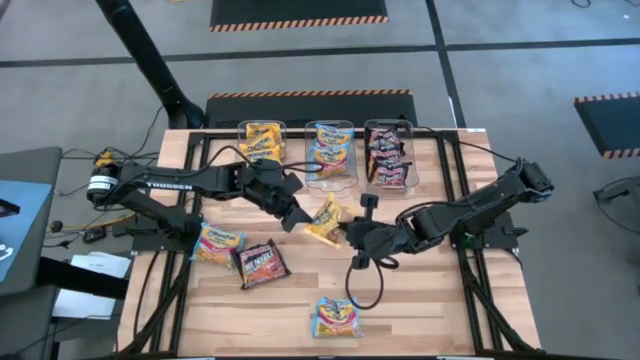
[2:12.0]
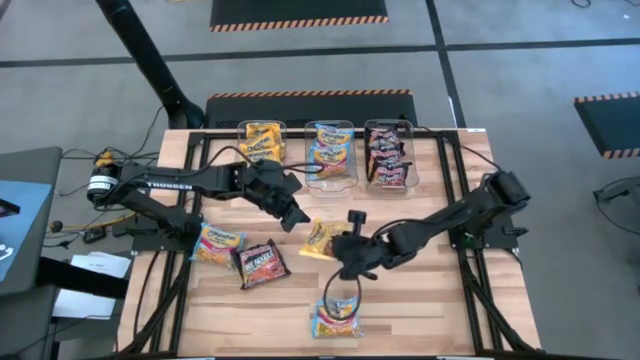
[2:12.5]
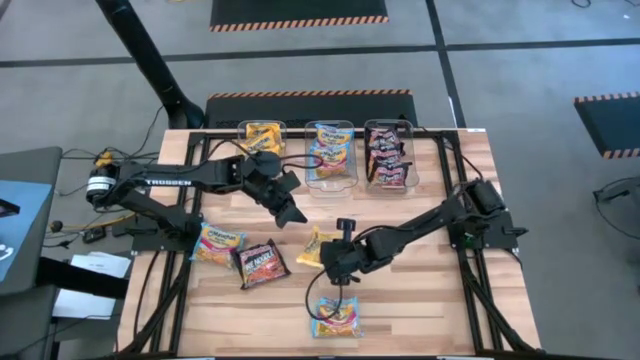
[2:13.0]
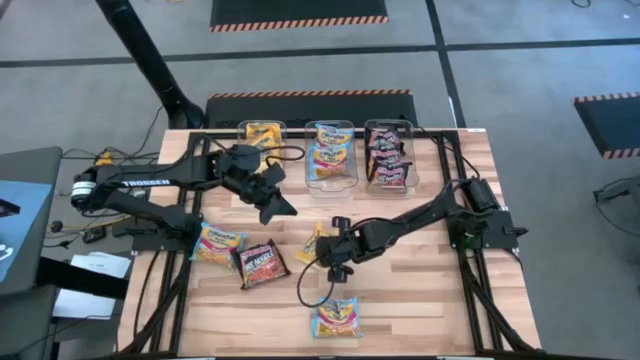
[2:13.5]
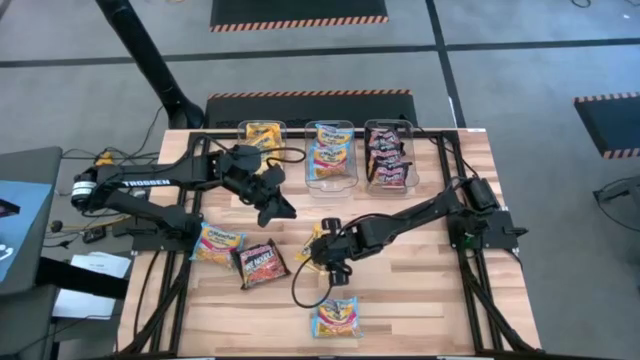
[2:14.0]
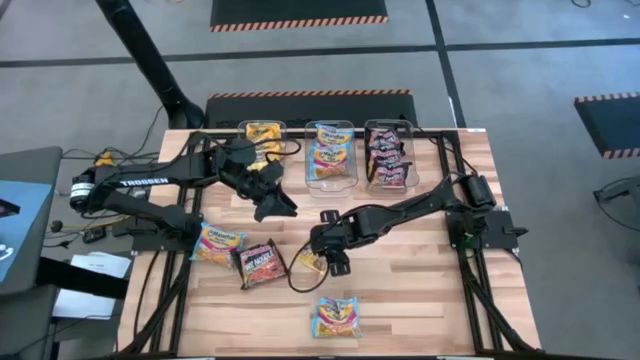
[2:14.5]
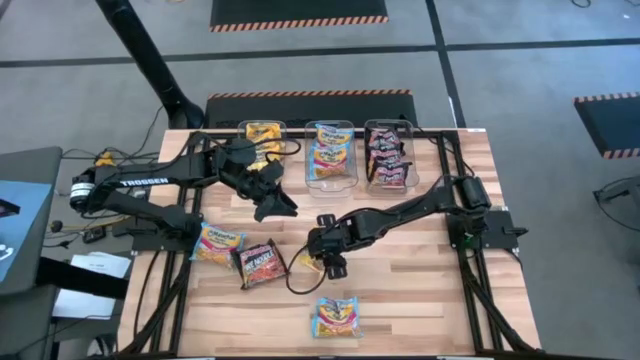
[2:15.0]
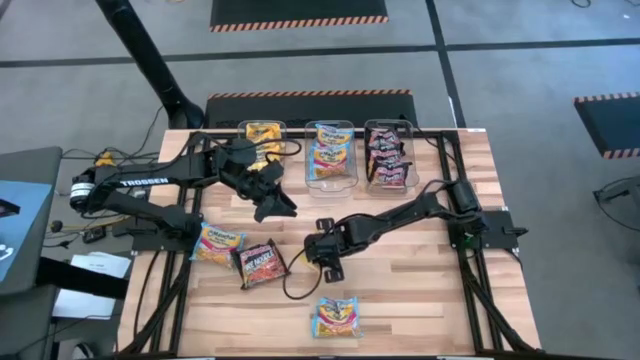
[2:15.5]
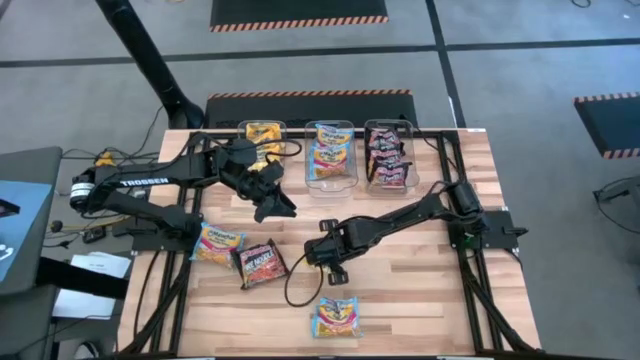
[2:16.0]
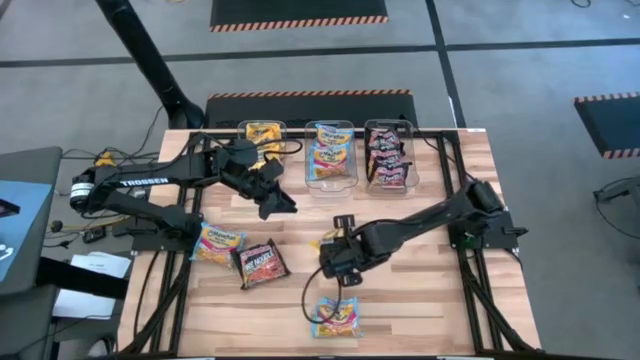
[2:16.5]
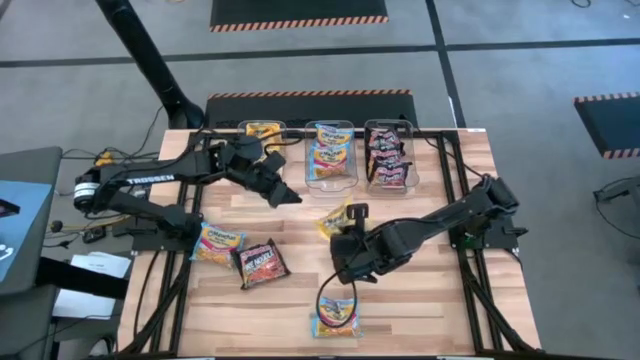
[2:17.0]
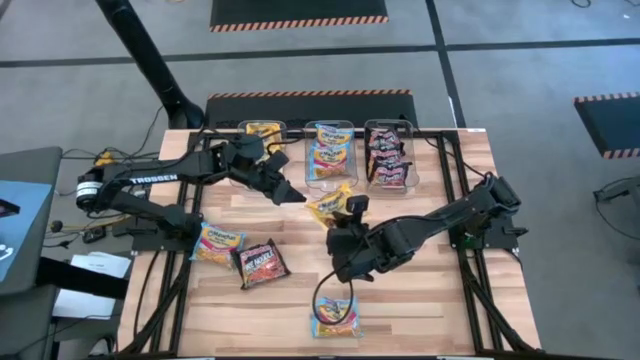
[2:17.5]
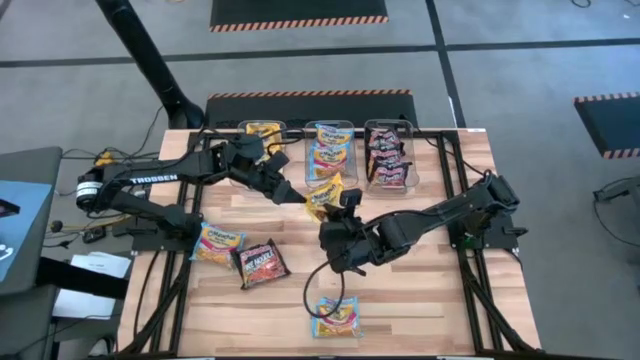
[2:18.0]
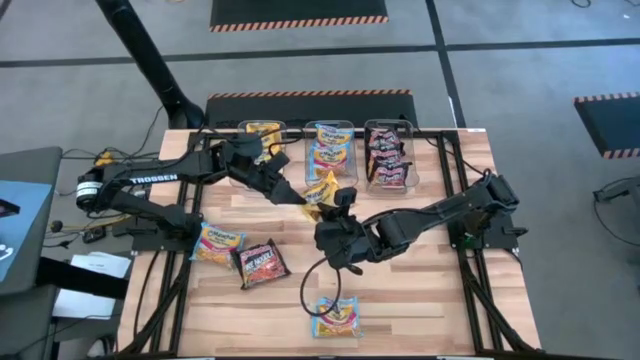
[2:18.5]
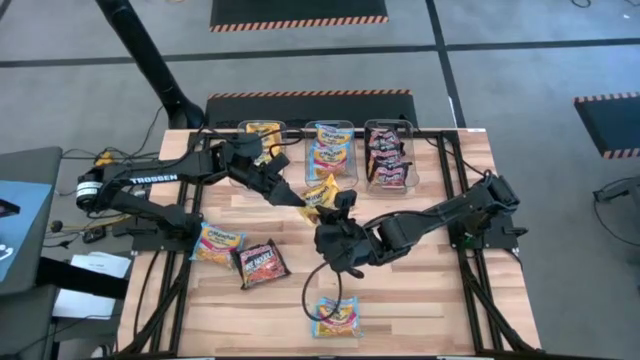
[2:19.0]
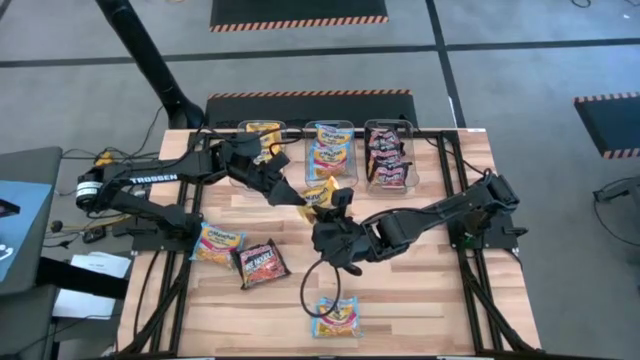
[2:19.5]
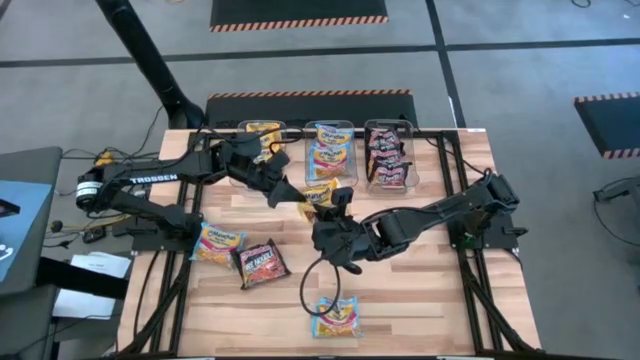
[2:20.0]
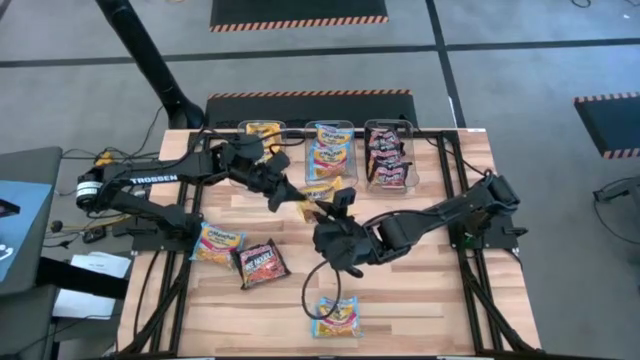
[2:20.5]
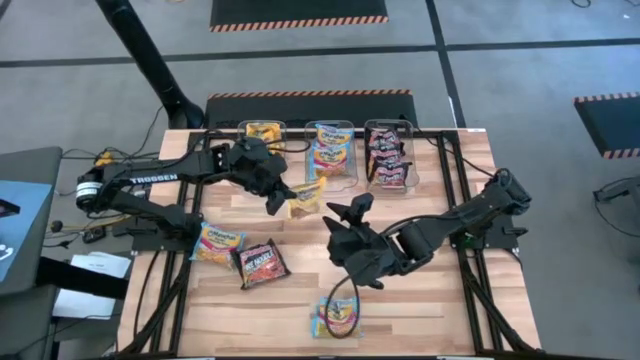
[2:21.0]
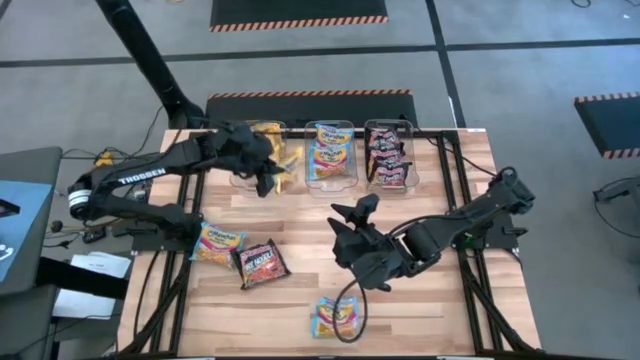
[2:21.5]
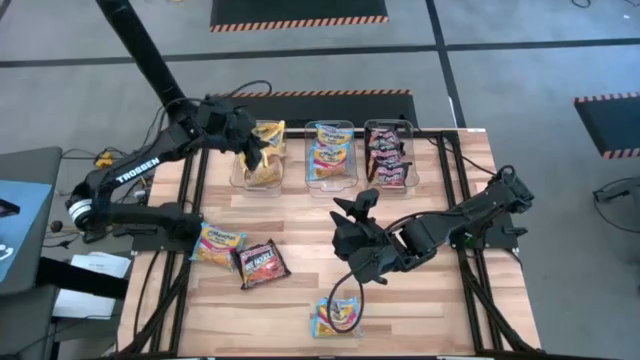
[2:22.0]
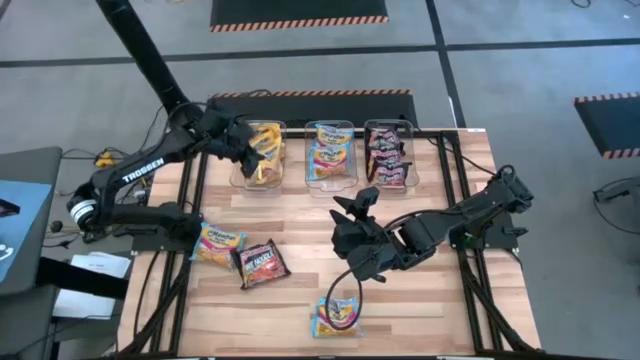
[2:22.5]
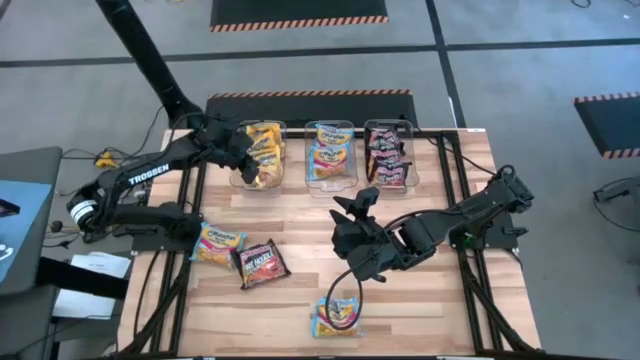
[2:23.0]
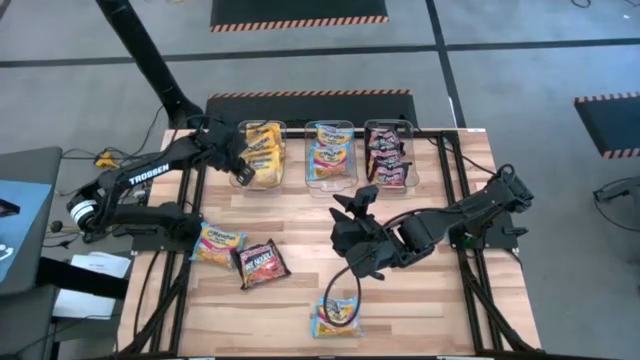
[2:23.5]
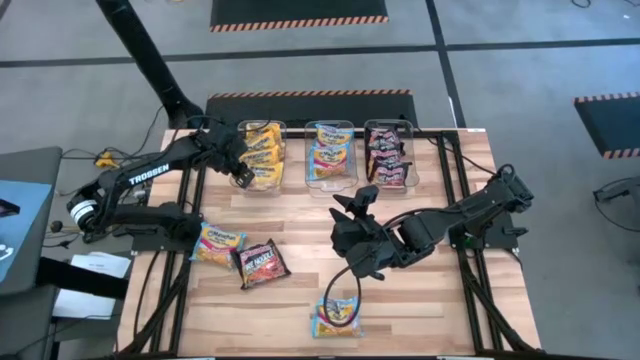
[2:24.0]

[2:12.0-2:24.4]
Task: Sort Maruchan noodles
Put the yellow noodle pack into the left transparent bin

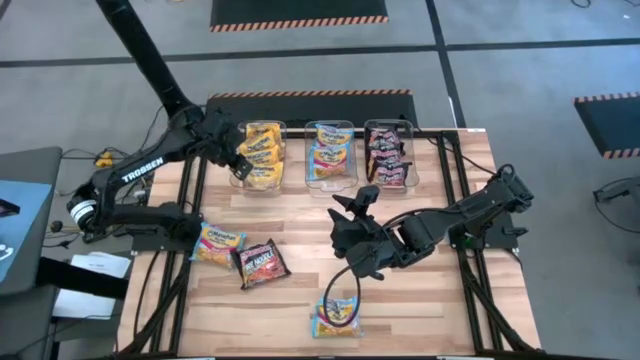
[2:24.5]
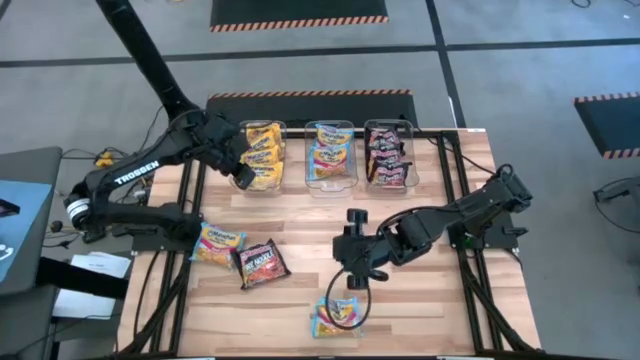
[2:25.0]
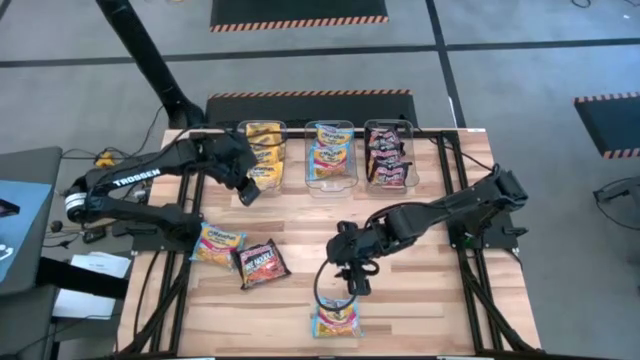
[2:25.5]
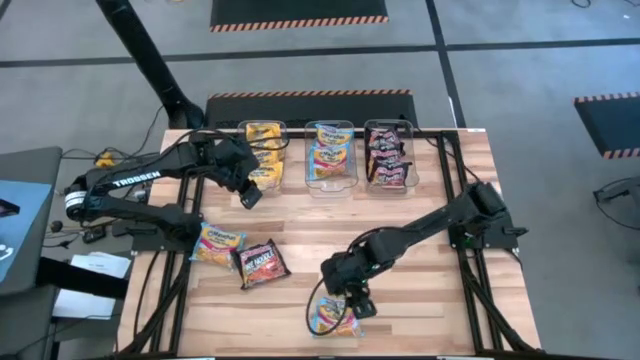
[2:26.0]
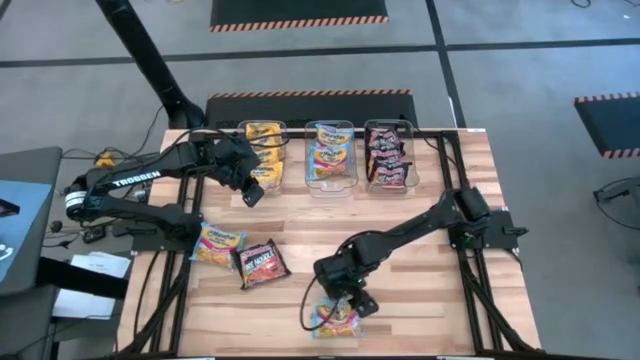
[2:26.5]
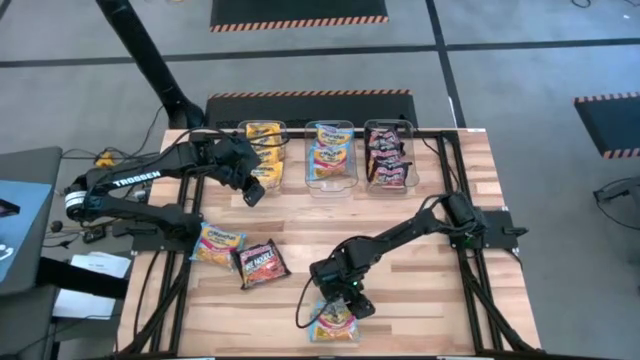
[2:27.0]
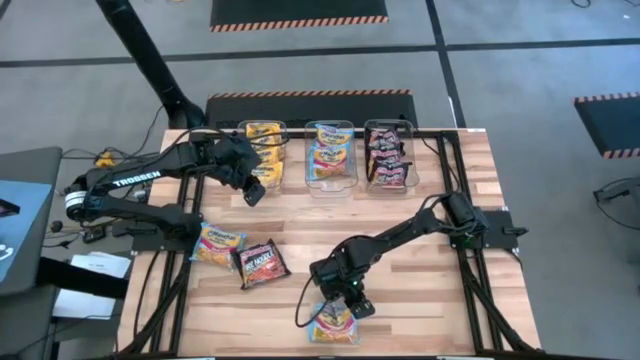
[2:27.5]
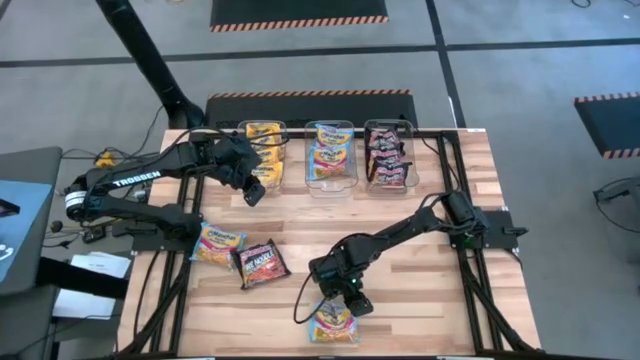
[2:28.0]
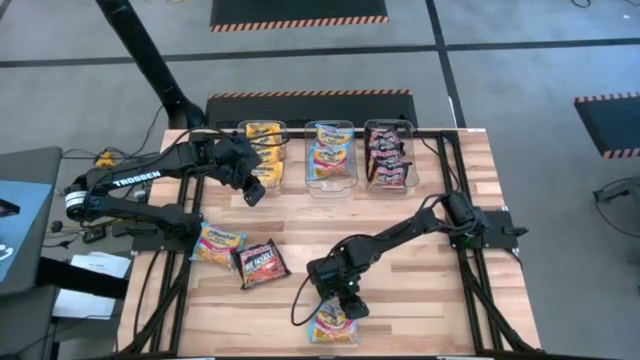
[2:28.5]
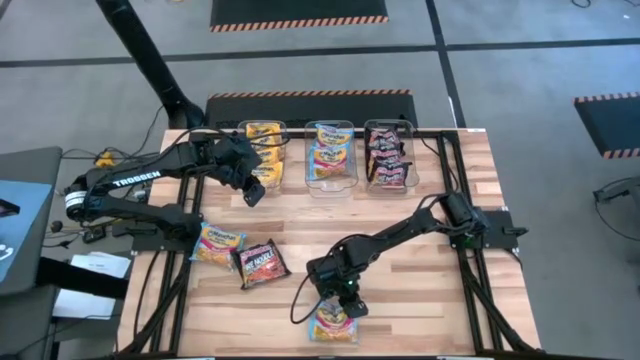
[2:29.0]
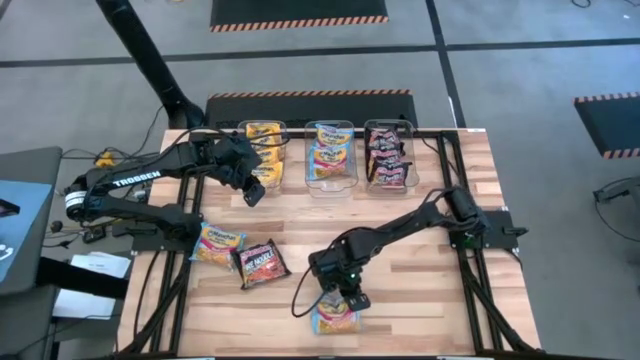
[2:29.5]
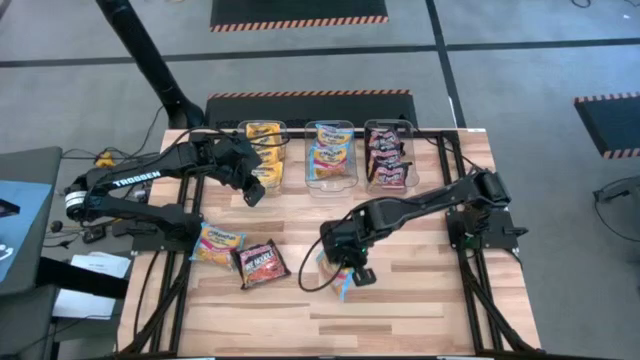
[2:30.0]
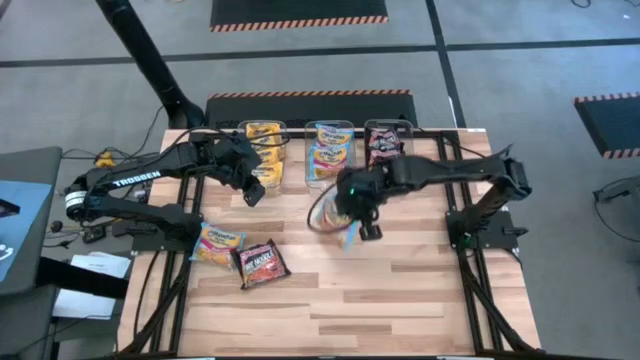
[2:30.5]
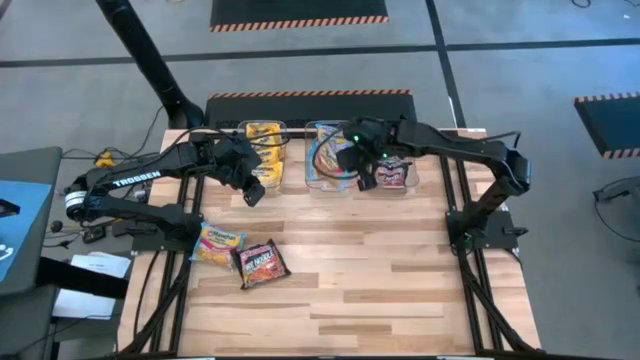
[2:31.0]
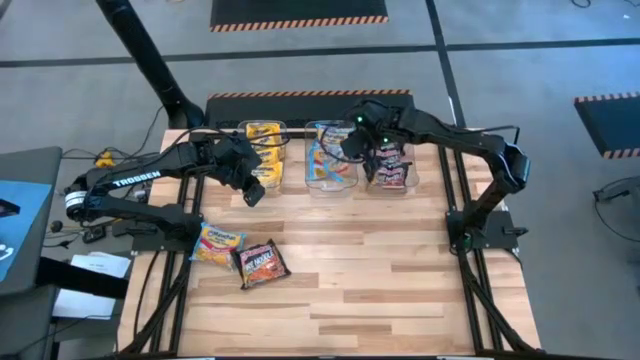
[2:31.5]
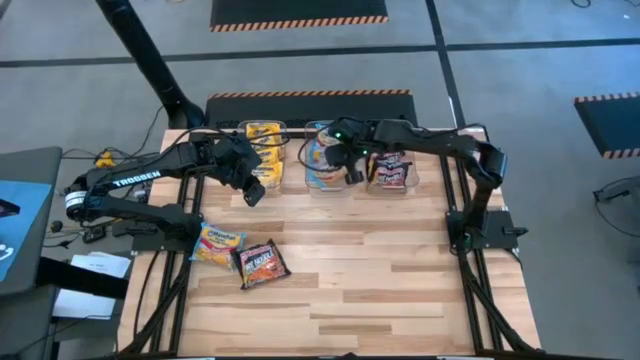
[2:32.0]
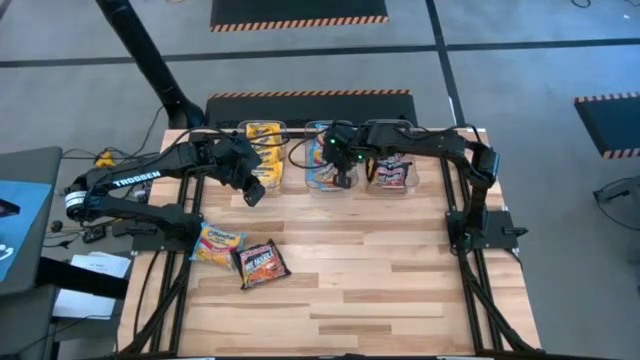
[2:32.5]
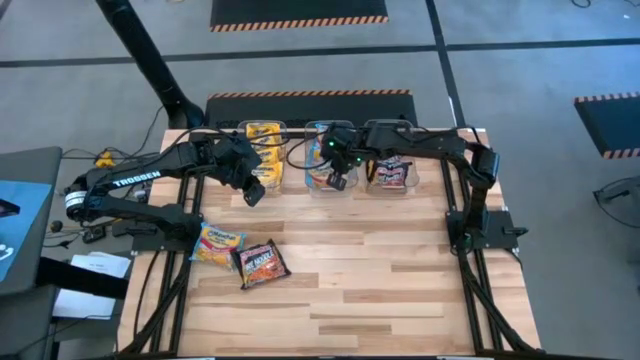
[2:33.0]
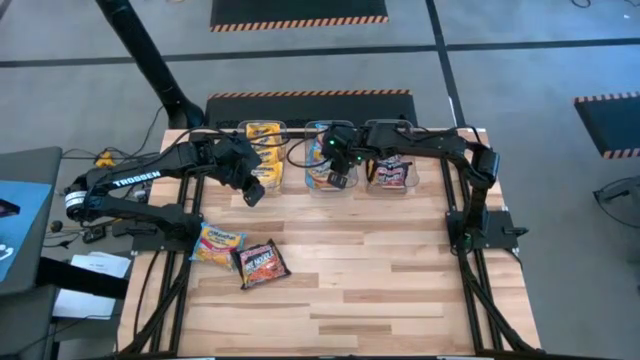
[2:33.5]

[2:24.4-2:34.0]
Put the blue noodle pack into the middle transparent bin
